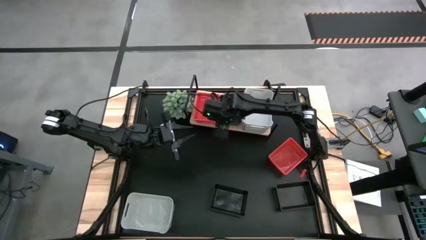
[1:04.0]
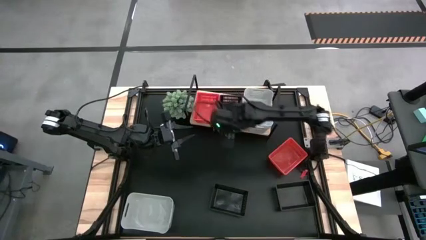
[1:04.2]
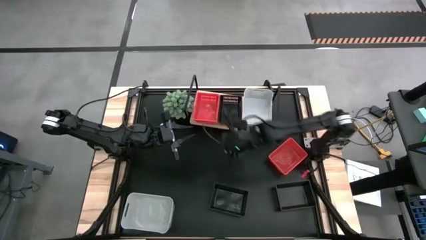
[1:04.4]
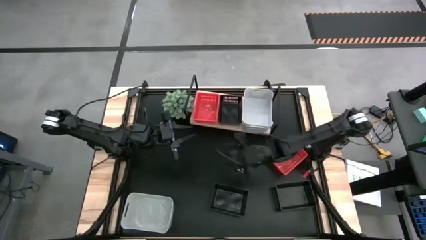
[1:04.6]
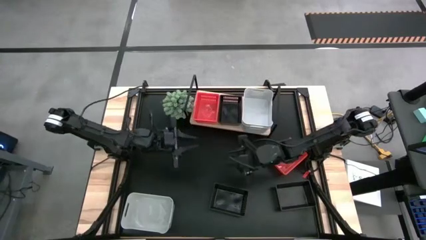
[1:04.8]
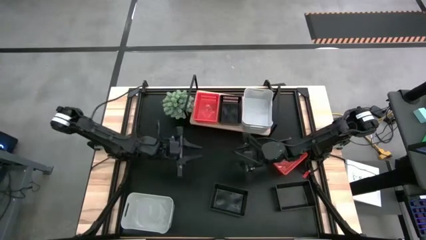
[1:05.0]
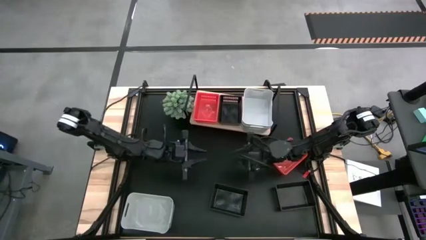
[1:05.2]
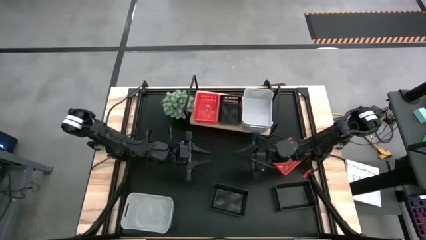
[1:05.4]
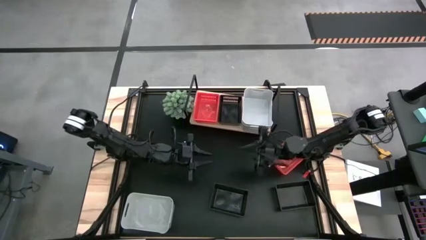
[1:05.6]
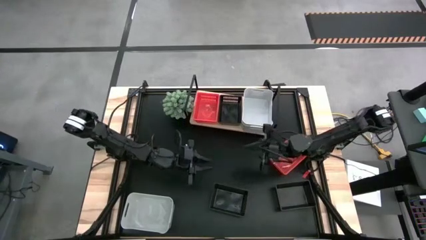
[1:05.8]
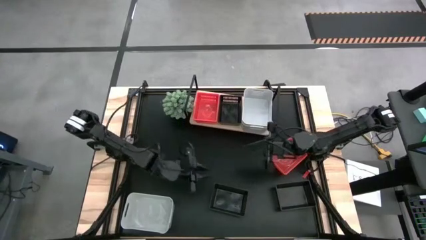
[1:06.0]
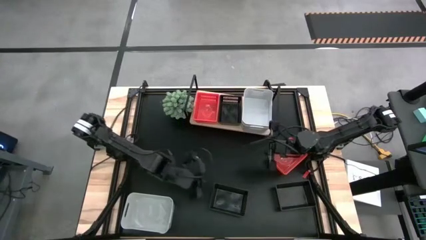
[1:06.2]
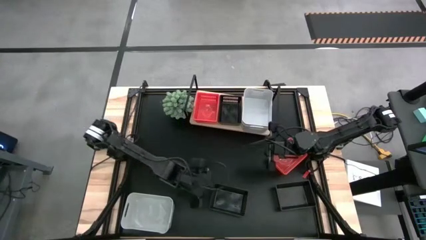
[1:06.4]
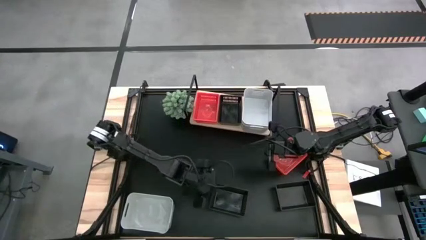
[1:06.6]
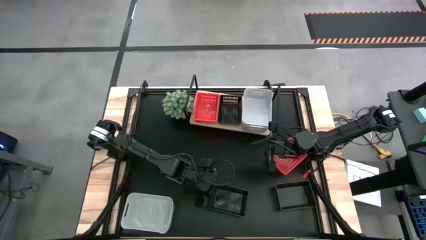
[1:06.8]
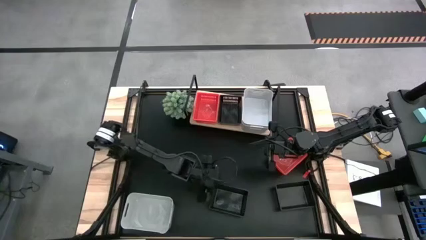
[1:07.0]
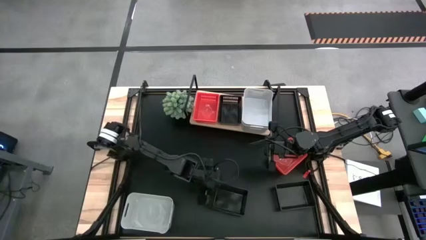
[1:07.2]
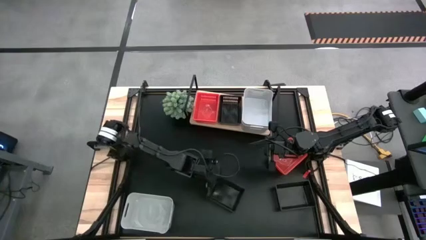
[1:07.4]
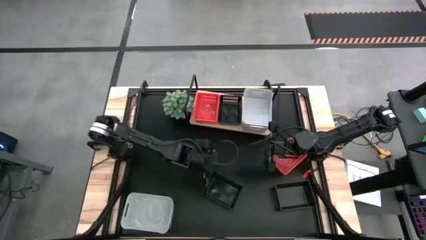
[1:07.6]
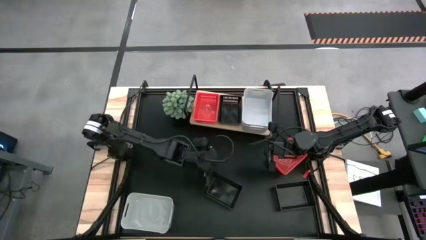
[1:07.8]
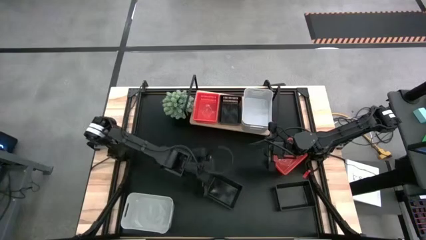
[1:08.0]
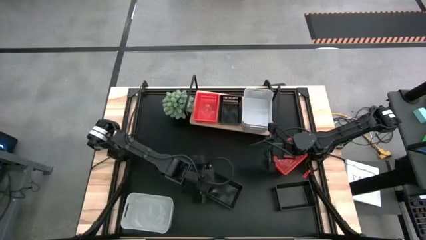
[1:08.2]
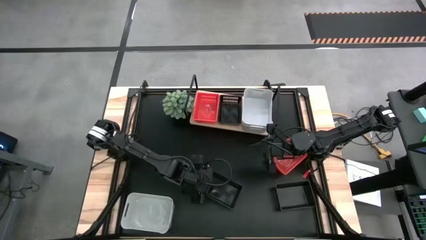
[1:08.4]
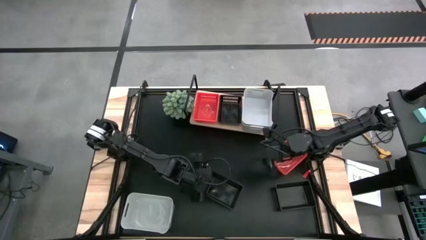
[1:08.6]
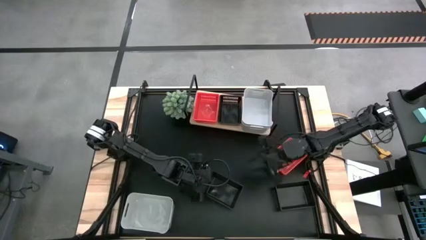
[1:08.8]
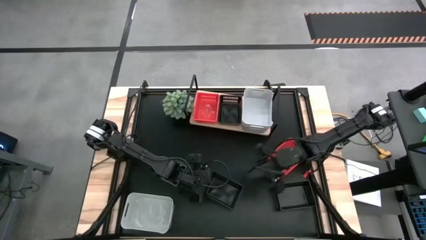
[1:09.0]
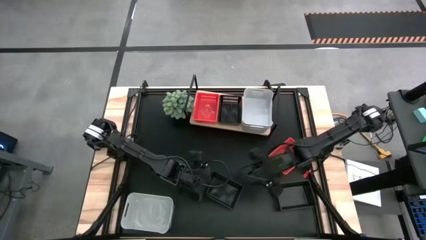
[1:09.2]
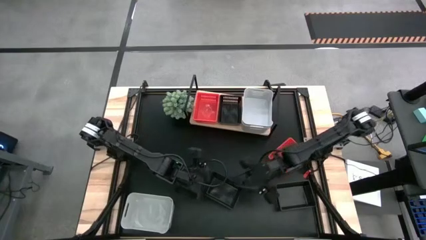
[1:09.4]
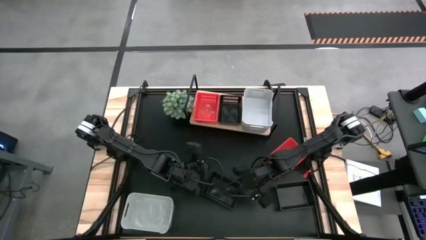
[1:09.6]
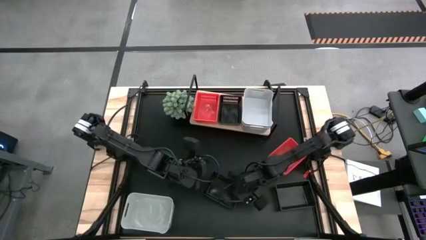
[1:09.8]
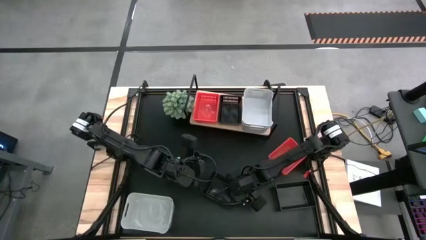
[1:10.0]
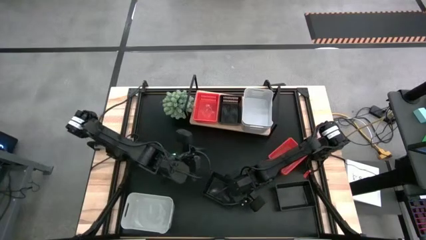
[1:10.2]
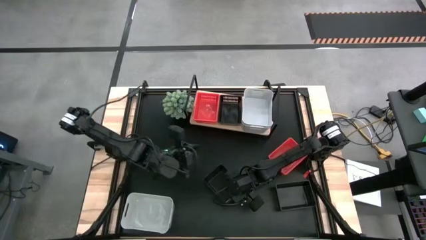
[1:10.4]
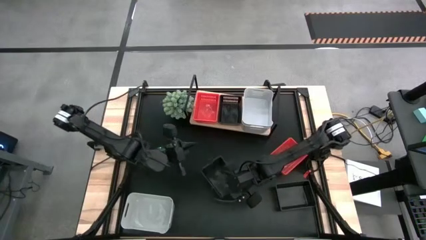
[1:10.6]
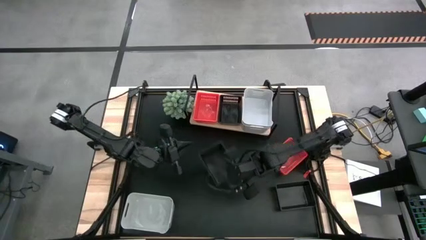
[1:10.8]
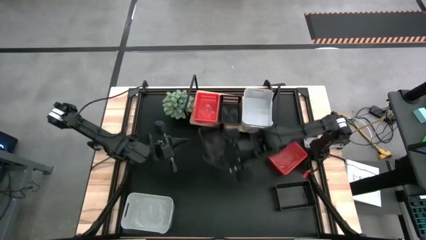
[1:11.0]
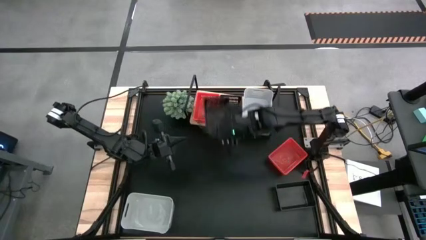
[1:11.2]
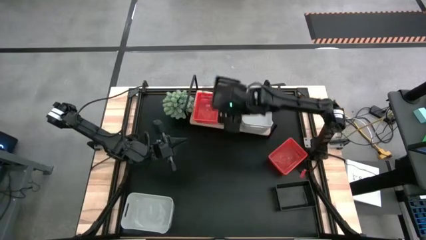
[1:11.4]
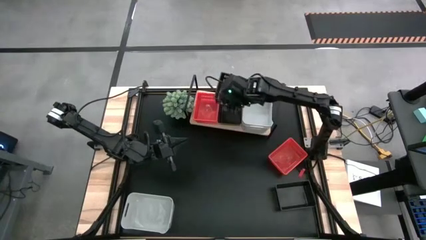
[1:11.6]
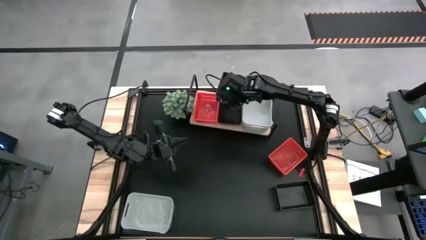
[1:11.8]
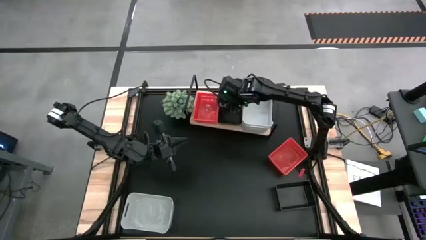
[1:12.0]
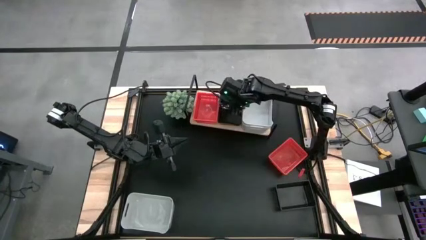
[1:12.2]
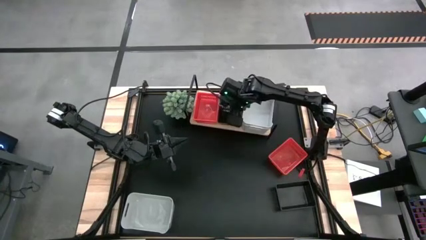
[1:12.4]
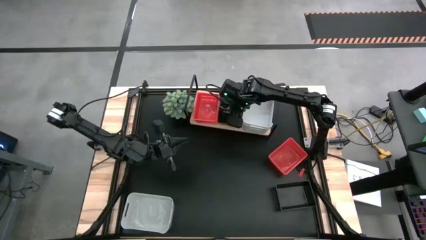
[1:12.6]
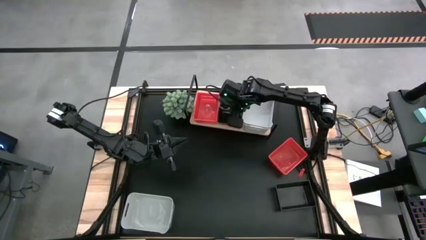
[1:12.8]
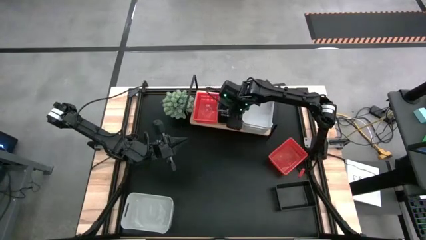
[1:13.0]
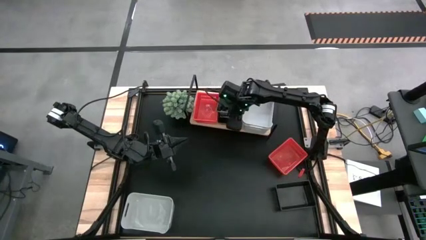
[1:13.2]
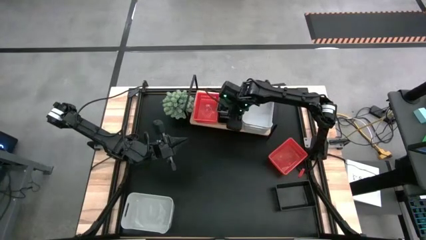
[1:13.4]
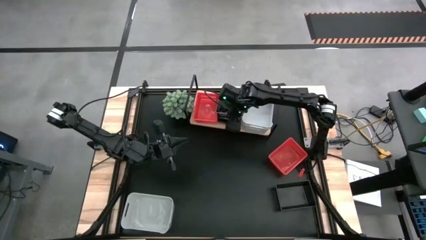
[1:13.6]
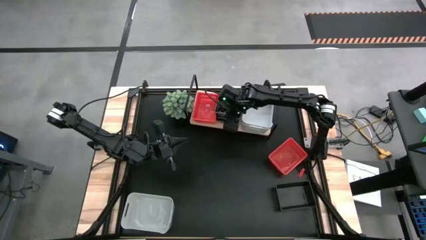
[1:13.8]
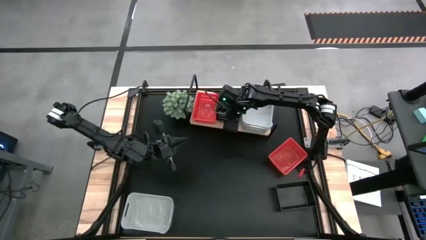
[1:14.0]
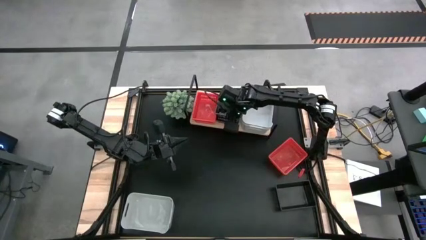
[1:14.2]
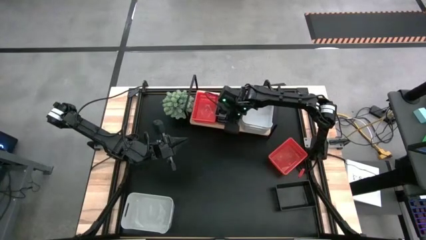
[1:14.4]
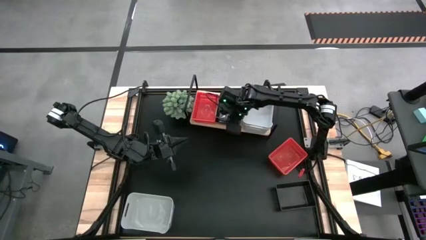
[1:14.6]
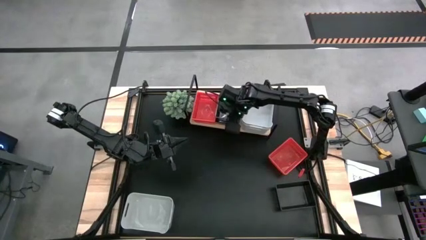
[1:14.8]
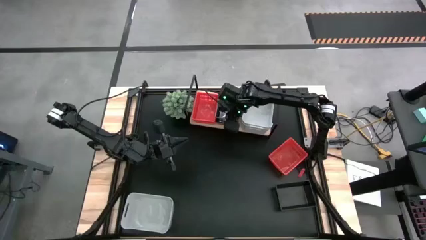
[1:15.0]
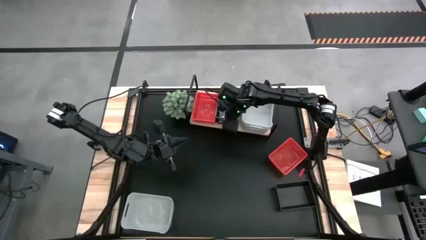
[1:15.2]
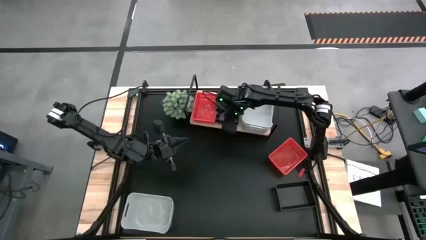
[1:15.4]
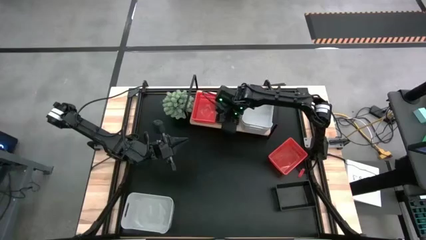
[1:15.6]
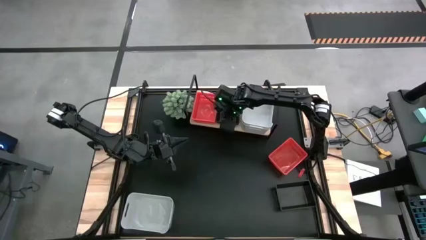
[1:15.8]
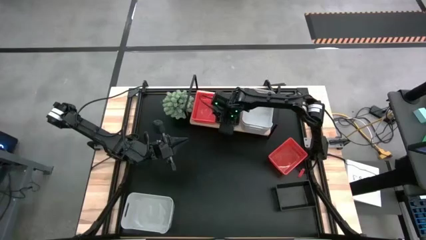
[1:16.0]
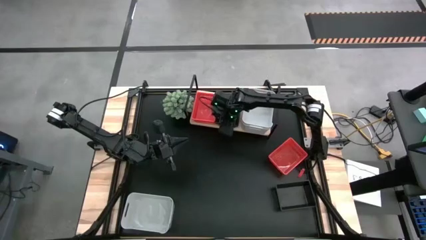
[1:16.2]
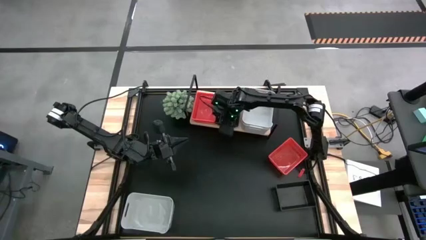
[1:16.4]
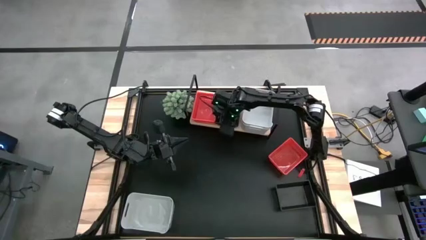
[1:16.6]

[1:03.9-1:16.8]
Task: Stack baskets on shelf by color
Stack the left black basket on top of the black basket on the shelf
